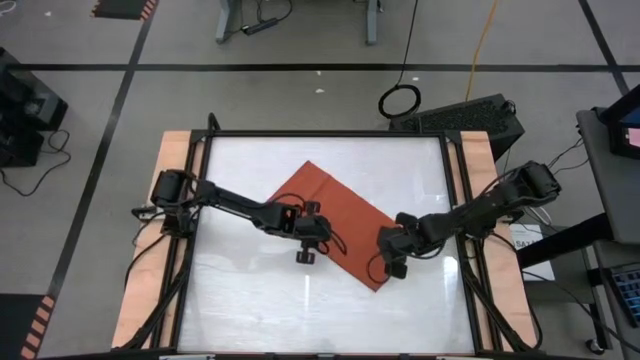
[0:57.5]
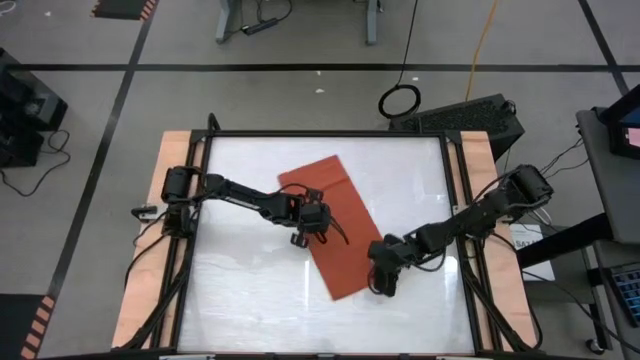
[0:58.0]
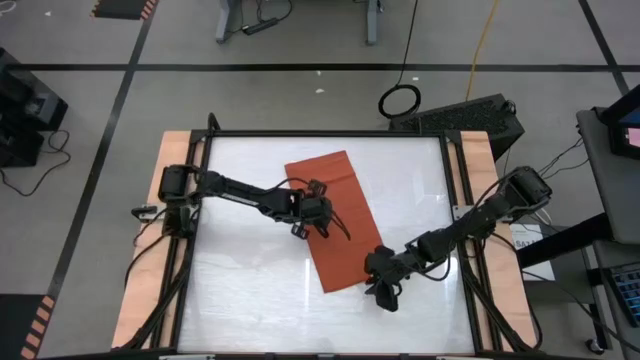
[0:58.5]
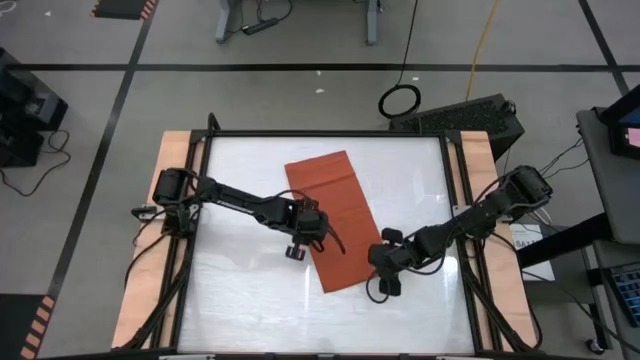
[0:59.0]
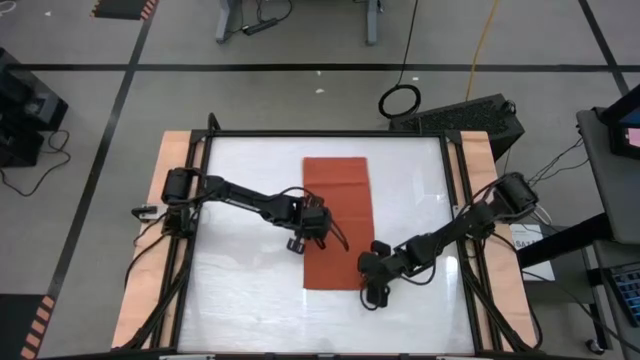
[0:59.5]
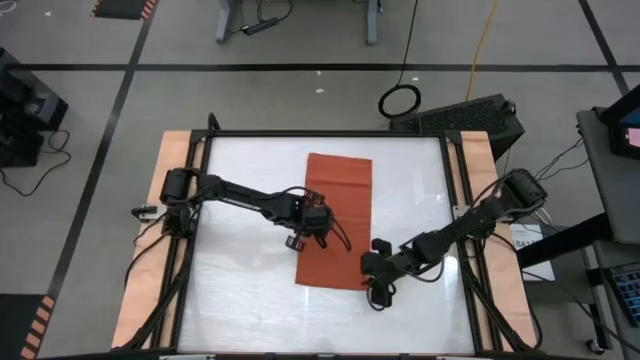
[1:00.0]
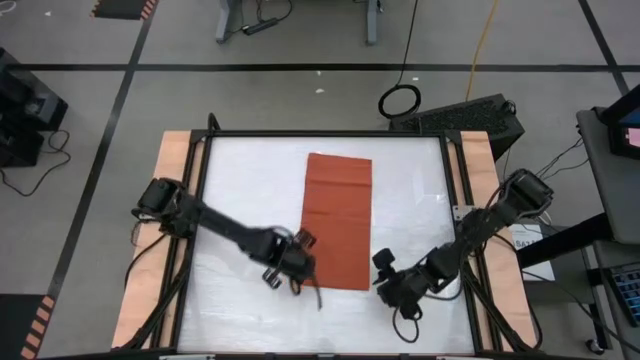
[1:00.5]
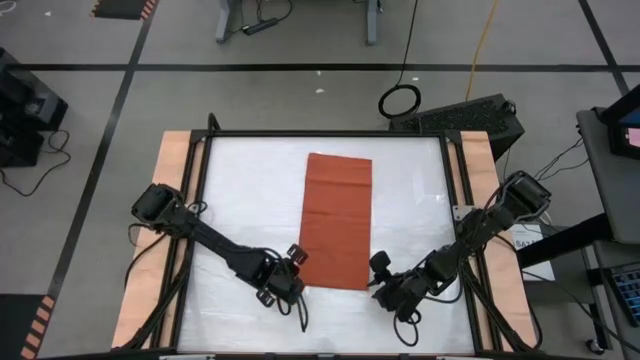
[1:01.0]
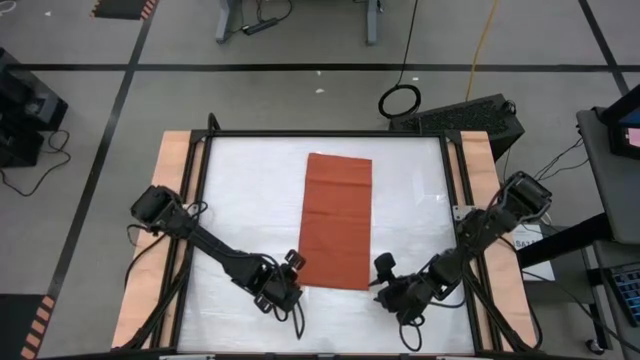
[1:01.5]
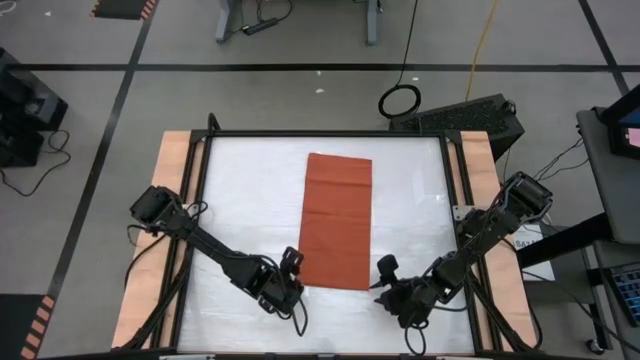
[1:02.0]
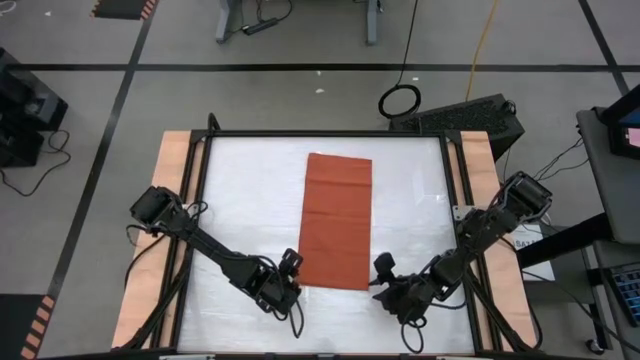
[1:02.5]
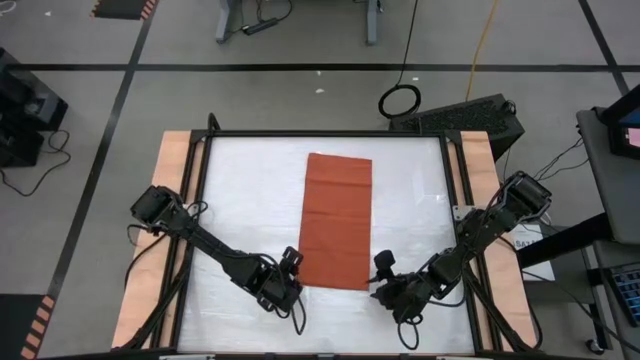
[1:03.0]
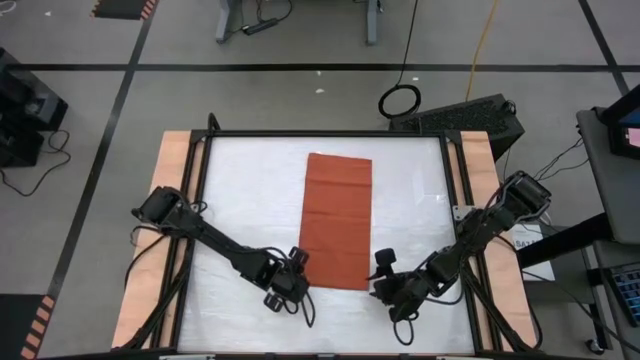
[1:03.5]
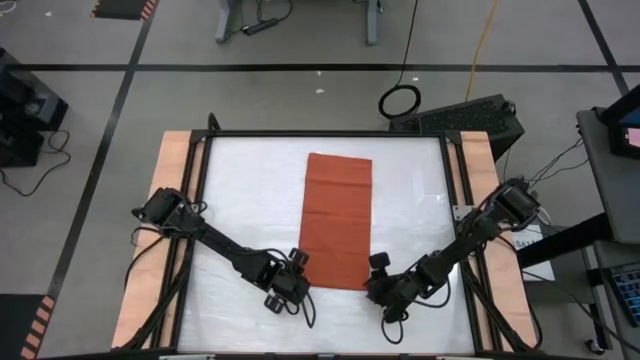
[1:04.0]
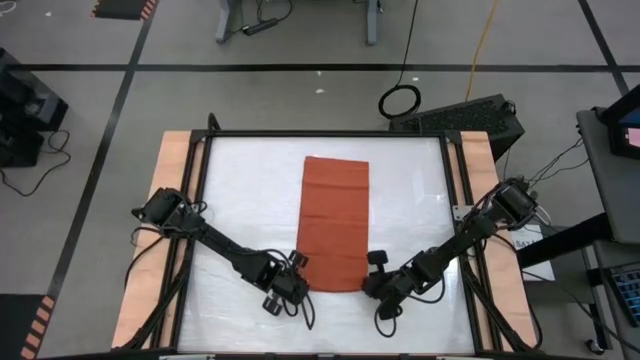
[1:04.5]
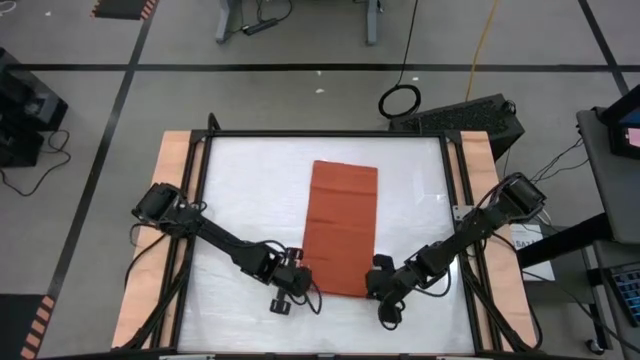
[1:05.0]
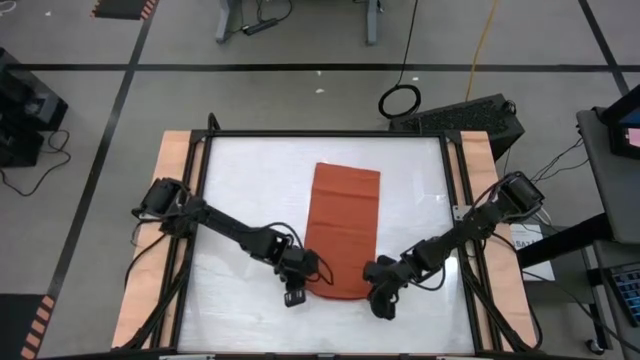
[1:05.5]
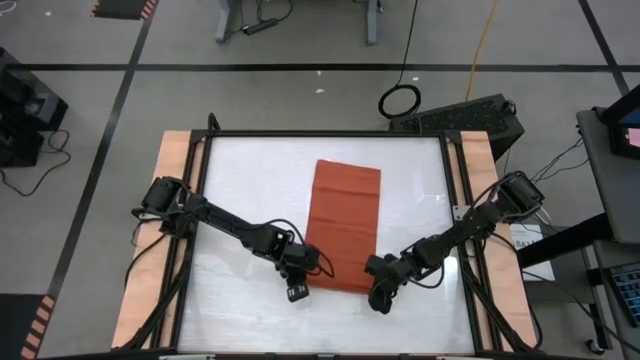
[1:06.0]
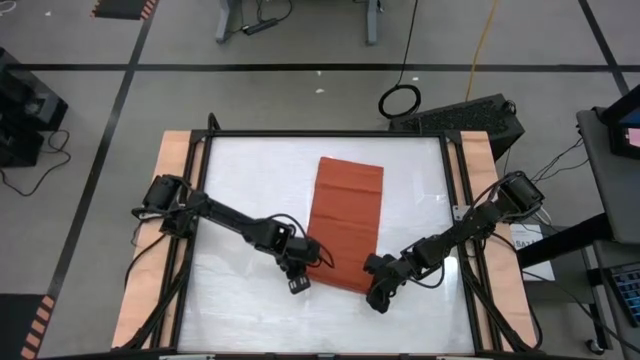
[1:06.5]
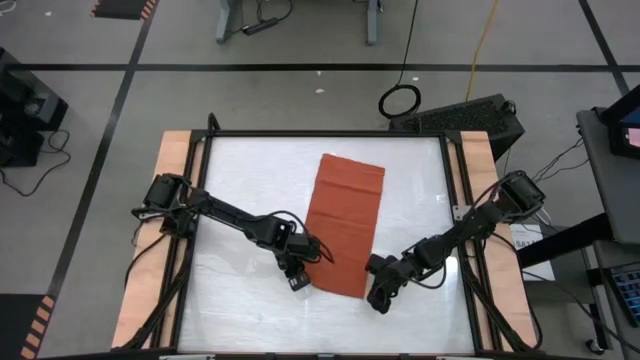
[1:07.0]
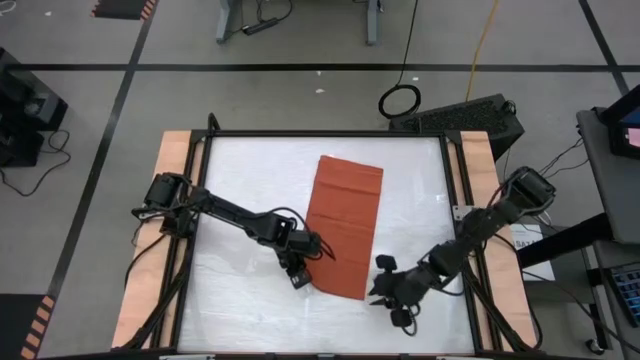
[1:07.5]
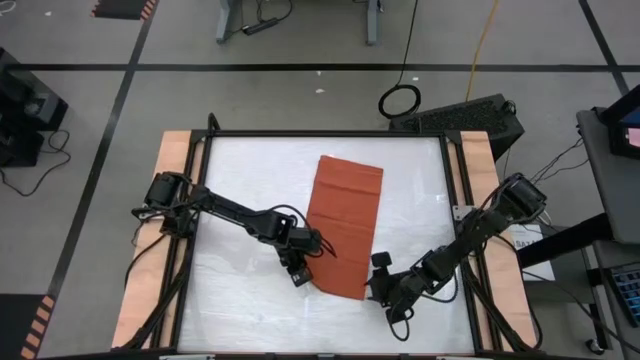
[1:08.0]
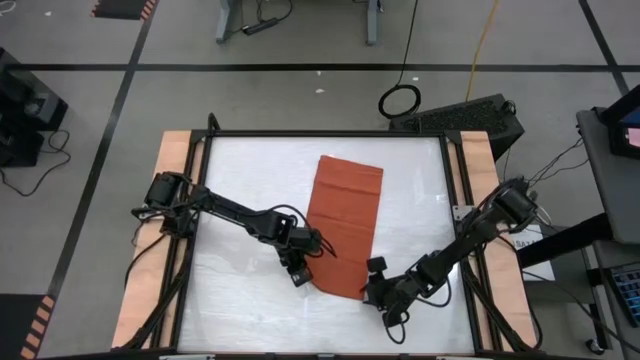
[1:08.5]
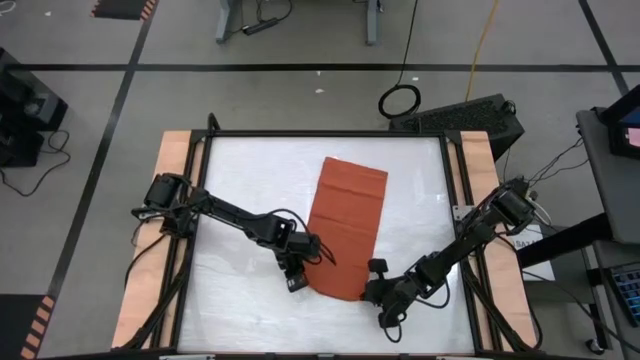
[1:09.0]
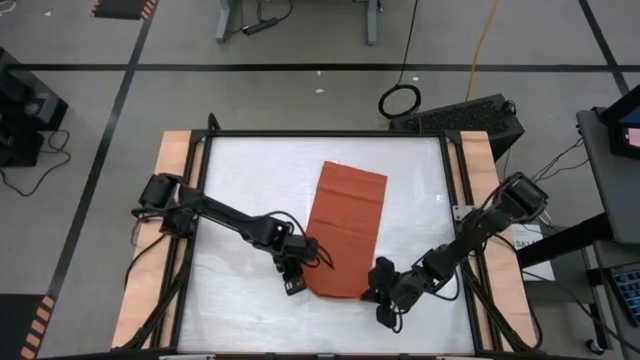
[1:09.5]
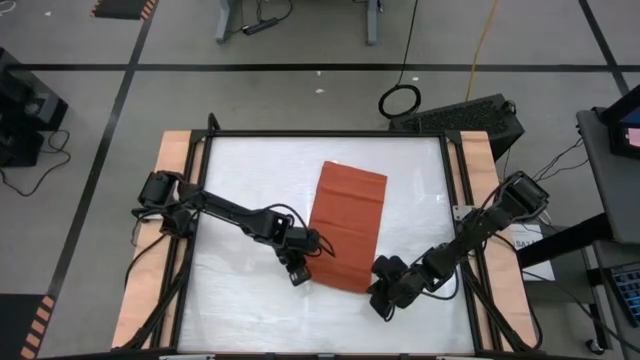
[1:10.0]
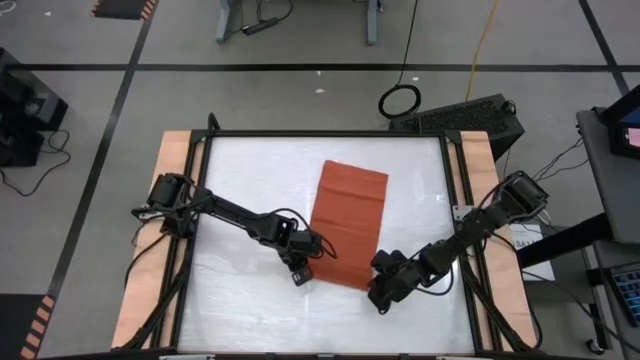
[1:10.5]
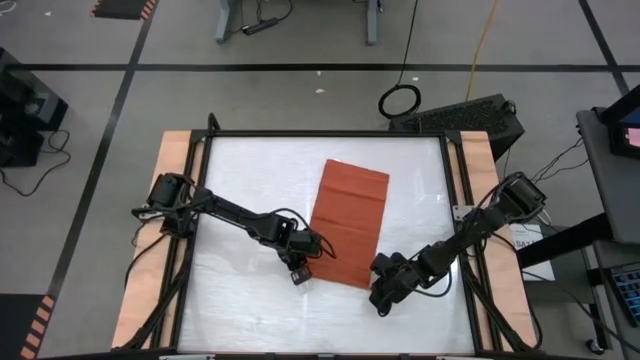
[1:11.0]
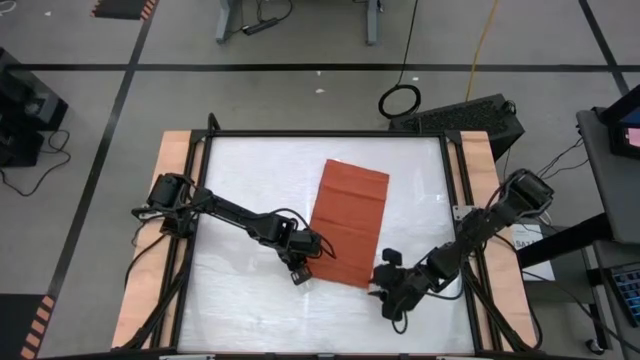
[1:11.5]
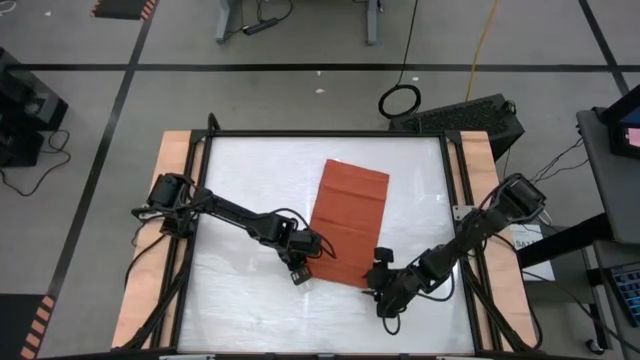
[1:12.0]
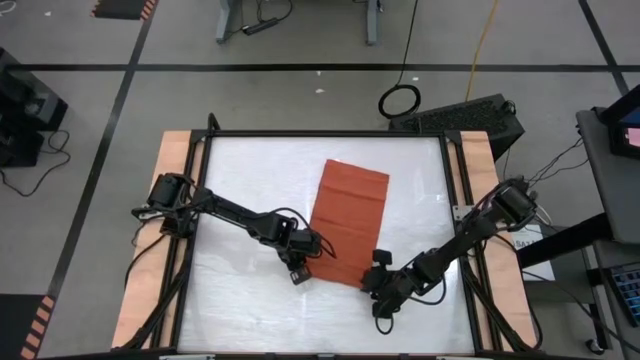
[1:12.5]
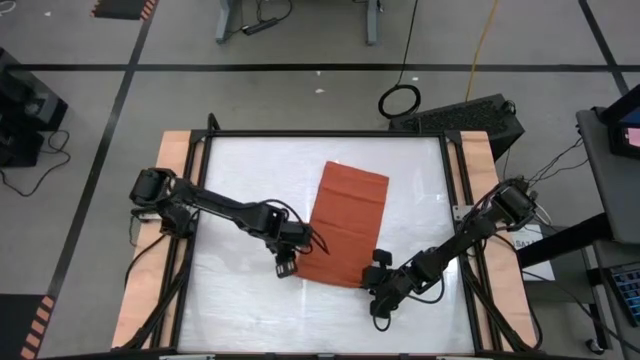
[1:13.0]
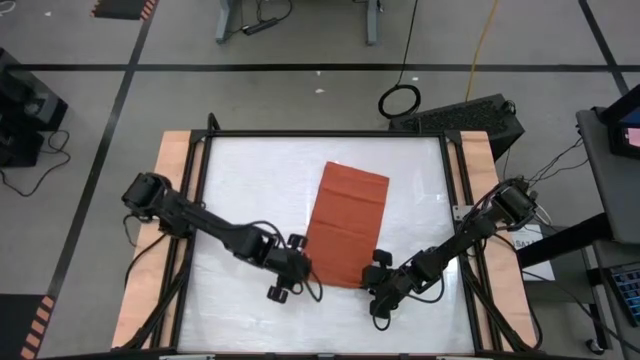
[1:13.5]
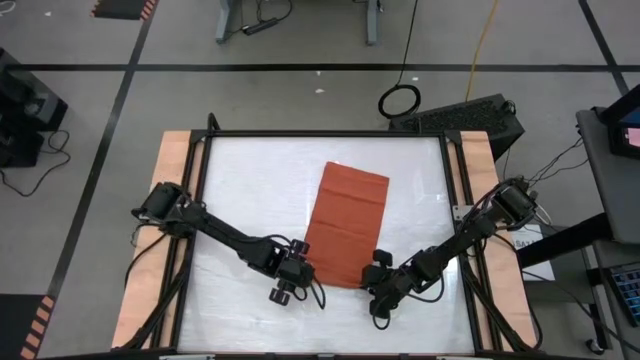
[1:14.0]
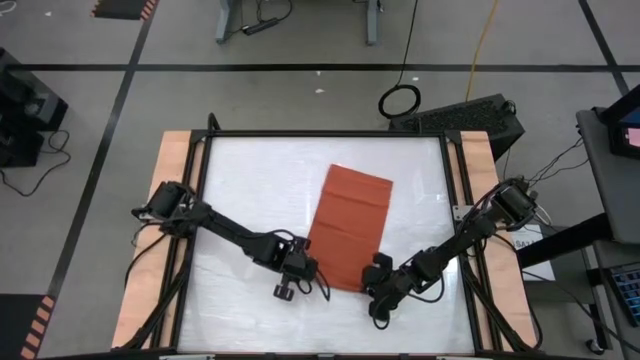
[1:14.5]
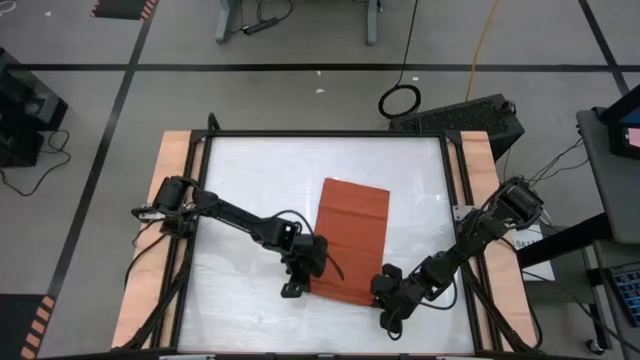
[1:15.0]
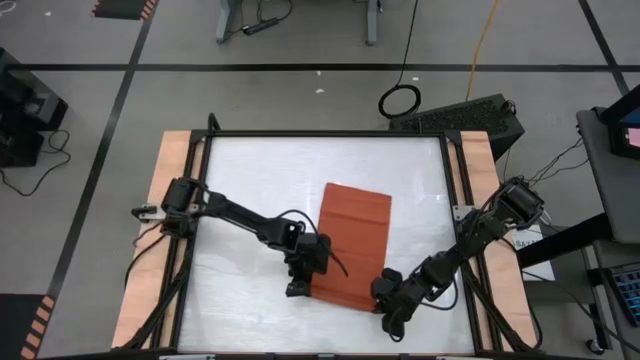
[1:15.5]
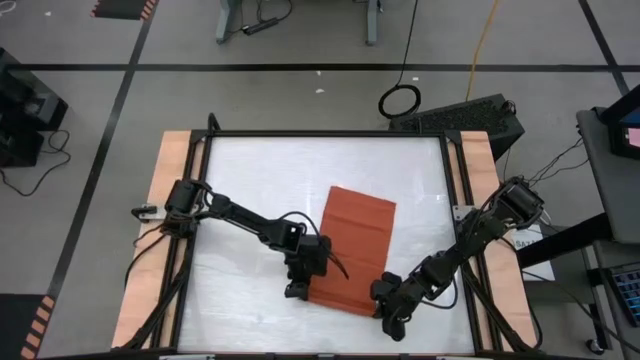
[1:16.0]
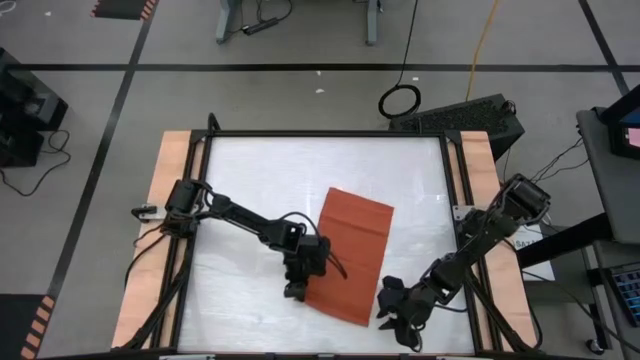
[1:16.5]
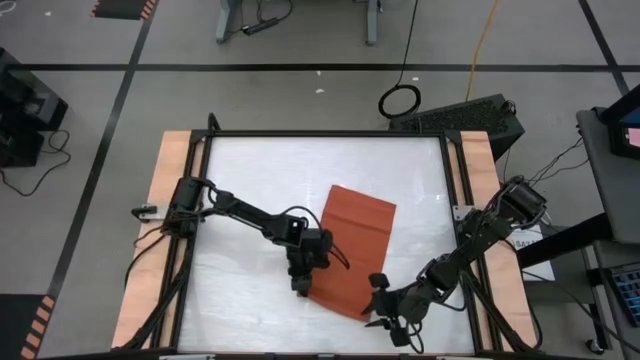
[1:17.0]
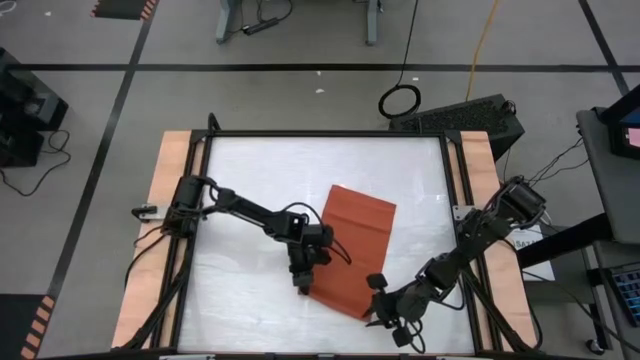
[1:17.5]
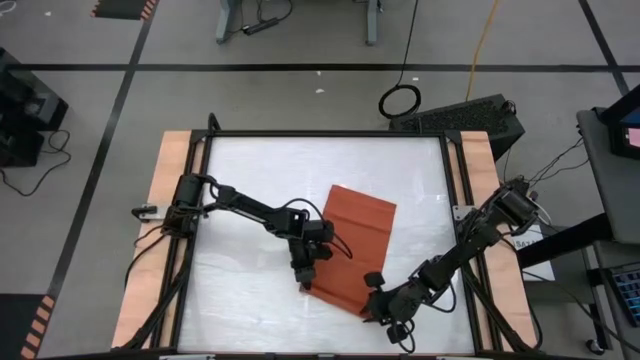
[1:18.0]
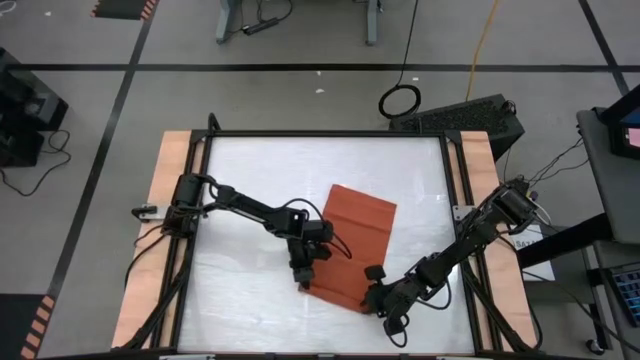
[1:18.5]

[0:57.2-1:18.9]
Task: Roll towel into tight, uniform cylinder
Roll the kitchen towel
